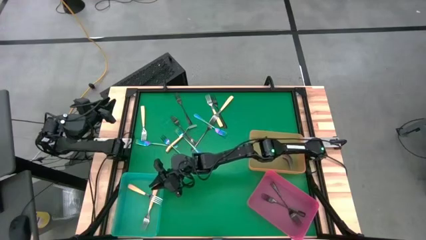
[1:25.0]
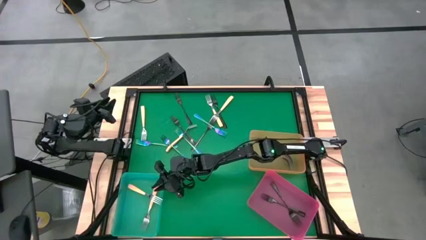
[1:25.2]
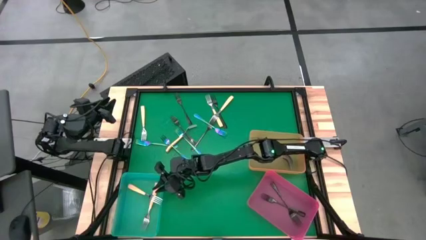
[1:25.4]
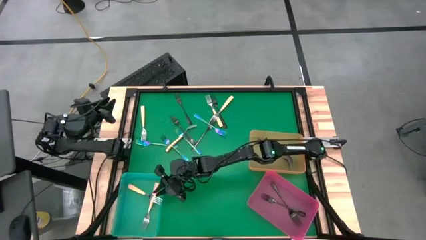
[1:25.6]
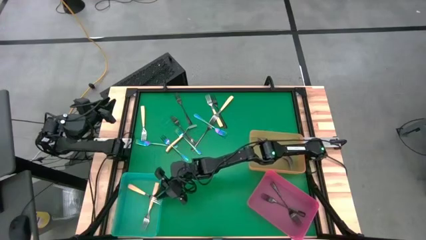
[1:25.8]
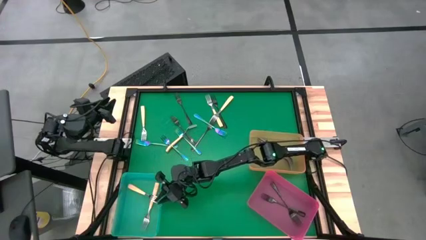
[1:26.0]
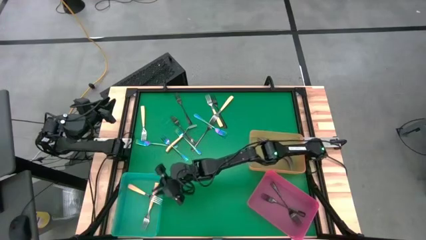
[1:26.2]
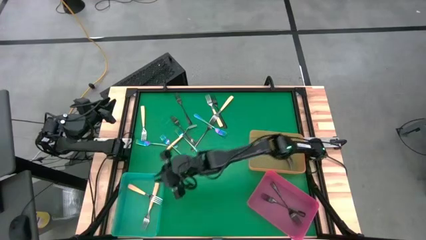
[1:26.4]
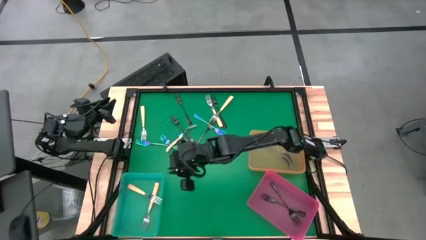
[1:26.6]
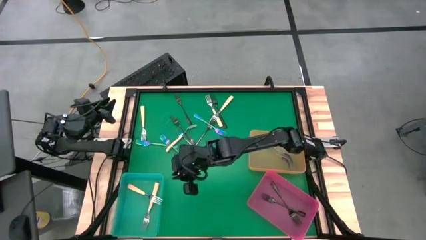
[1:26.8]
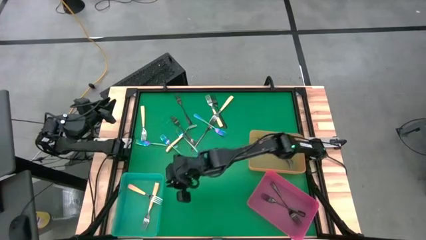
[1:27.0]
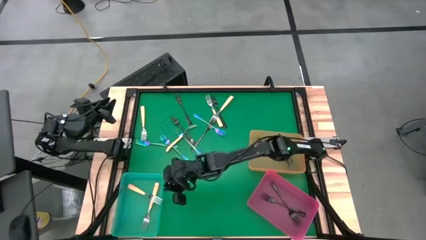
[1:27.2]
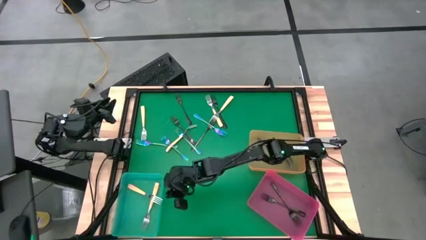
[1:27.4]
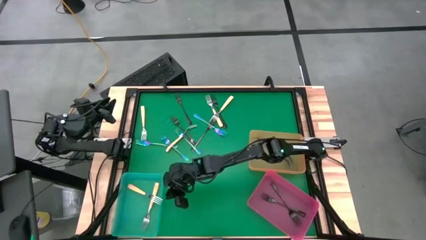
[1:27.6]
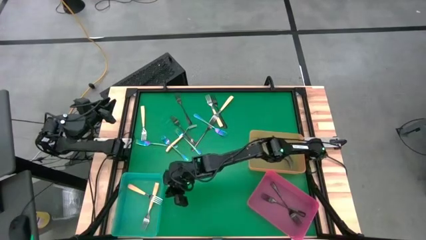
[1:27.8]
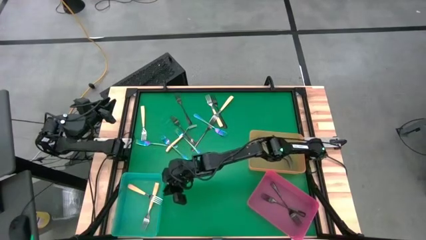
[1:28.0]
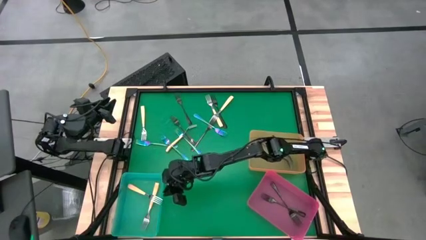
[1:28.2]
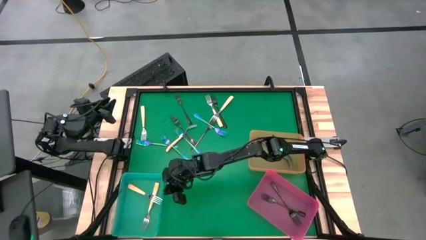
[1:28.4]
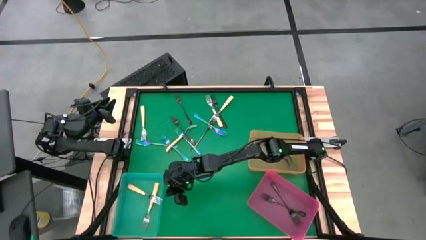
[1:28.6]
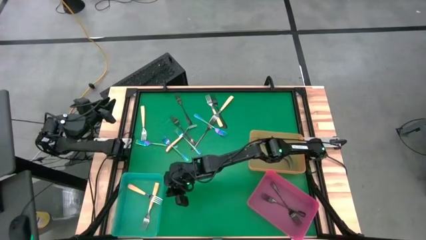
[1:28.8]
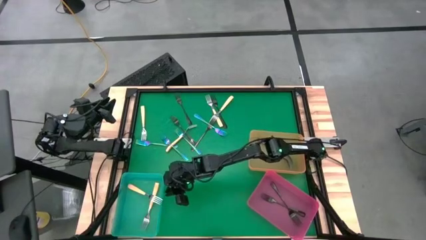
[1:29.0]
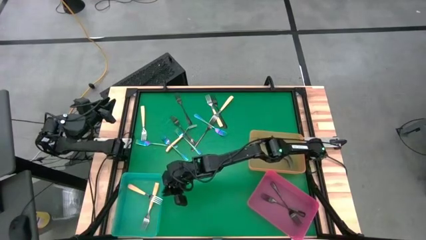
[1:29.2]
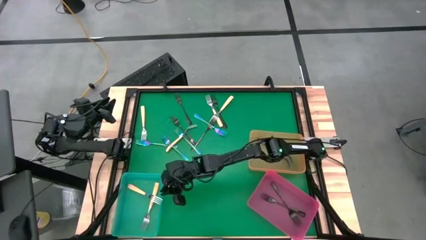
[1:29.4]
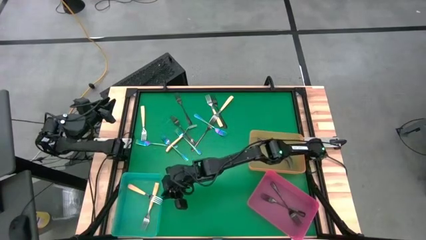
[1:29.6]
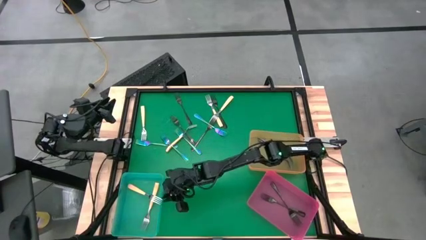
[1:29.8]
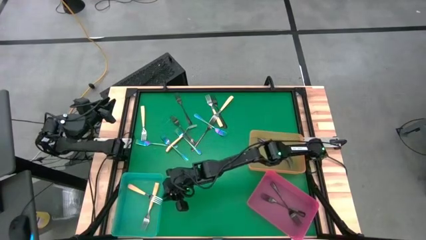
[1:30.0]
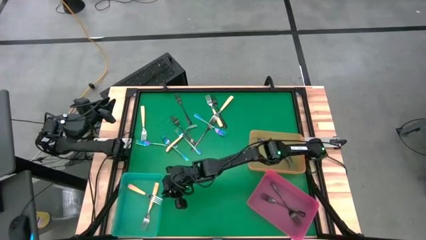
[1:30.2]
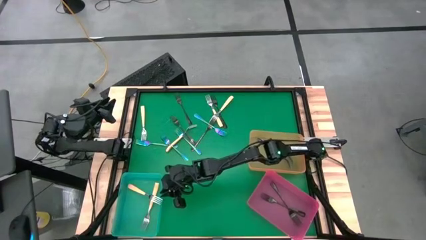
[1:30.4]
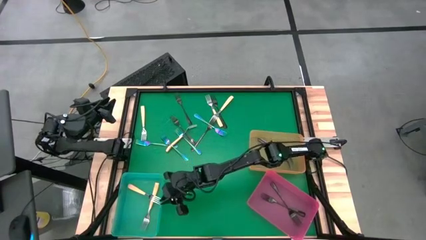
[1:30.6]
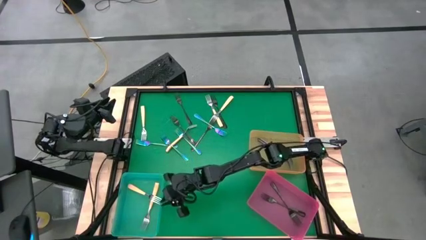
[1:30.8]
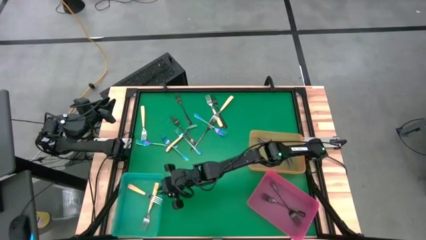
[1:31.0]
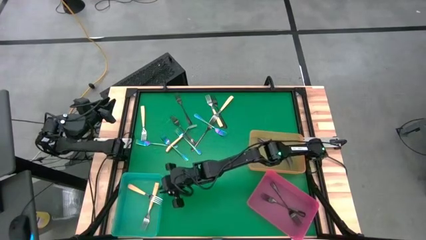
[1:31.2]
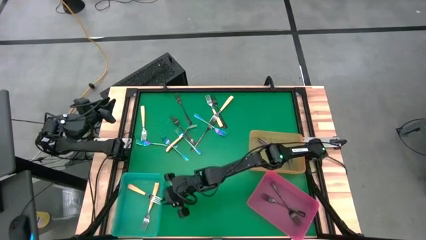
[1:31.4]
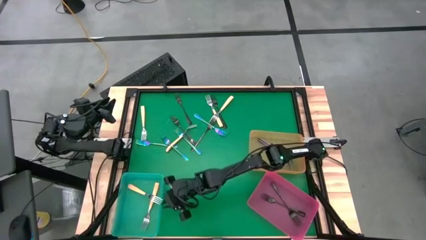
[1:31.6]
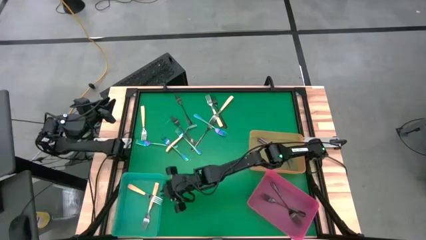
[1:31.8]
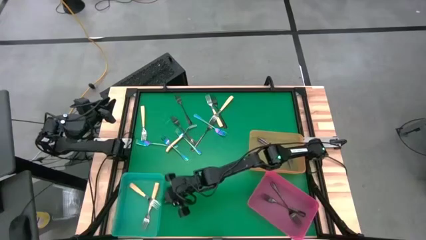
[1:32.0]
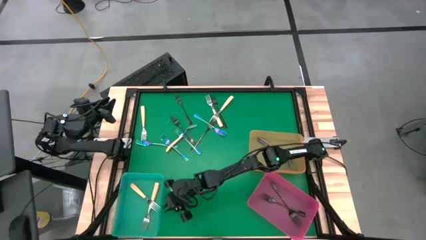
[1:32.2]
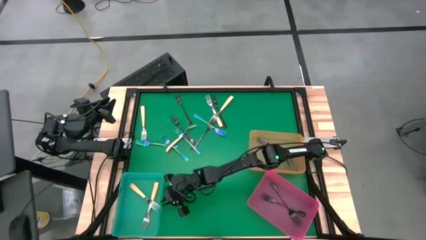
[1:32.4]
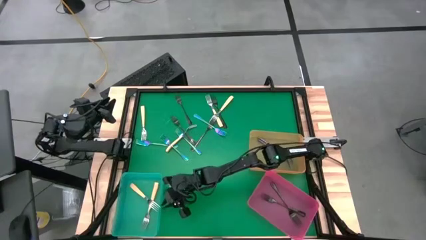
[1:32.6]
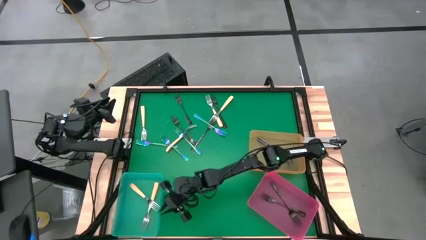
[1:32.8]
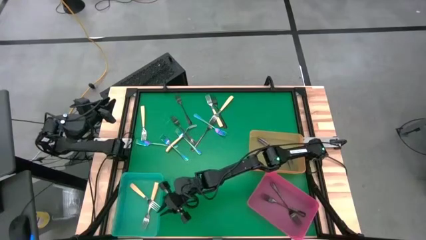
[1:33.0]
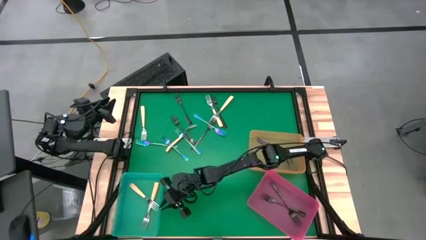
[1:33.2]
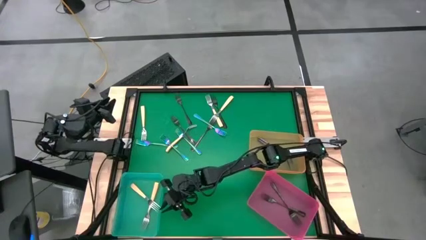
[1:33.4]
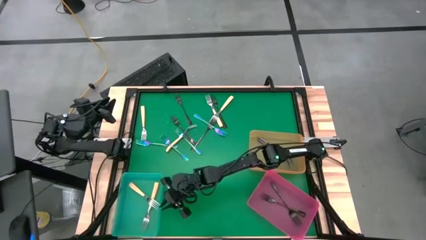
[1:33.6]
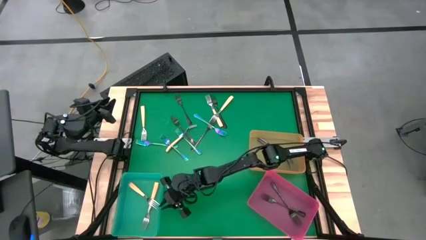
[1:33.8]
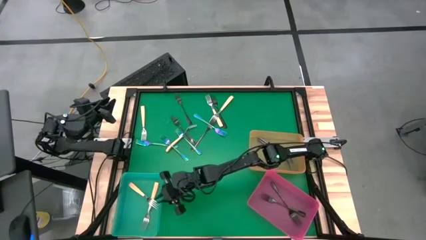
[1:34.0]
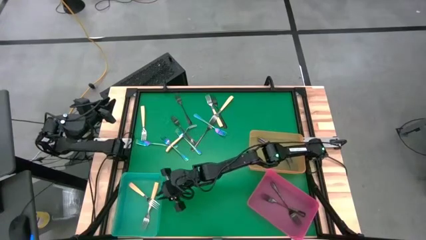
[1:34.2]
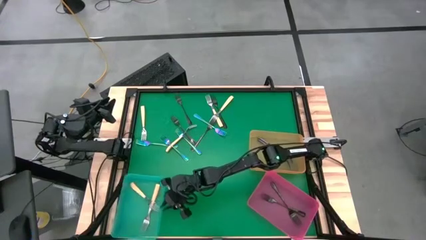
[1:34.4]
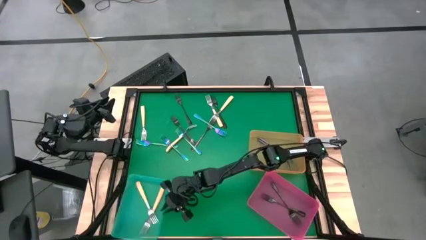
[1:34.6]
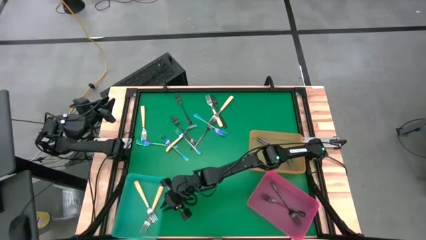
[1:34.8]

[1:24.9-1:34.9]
Task: Sort silverware by color (type)
Put the yellow fork into the blue bin

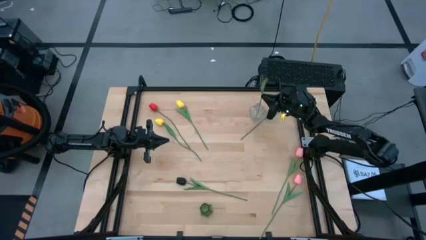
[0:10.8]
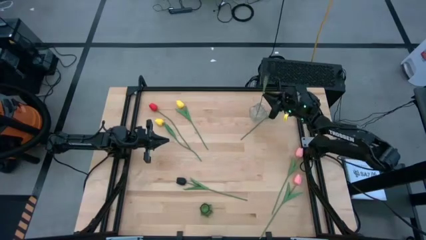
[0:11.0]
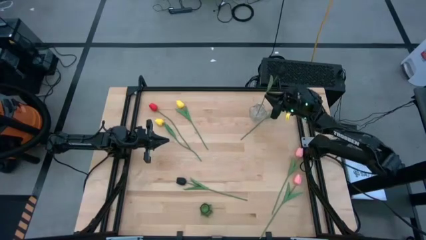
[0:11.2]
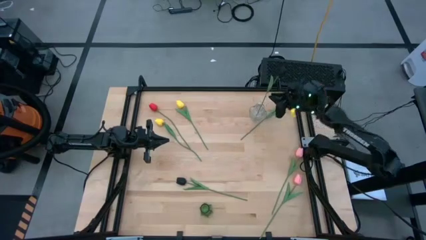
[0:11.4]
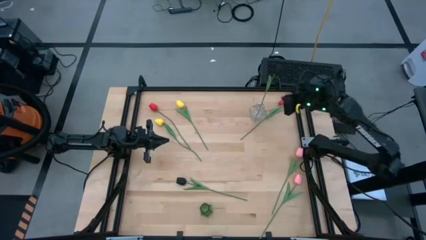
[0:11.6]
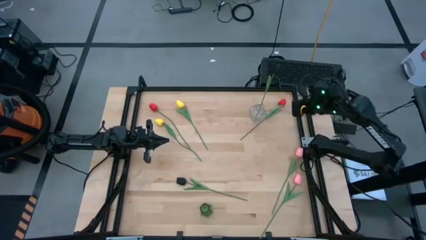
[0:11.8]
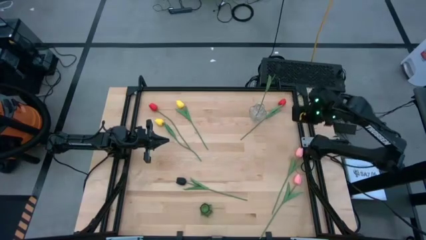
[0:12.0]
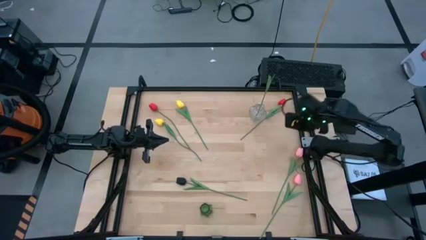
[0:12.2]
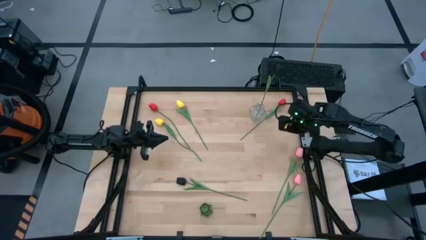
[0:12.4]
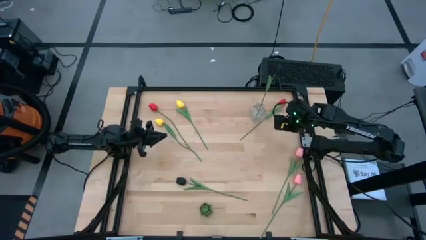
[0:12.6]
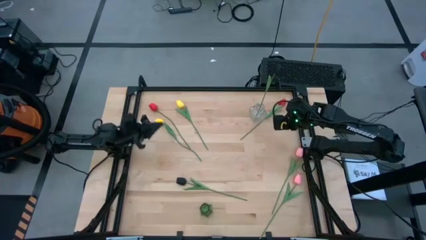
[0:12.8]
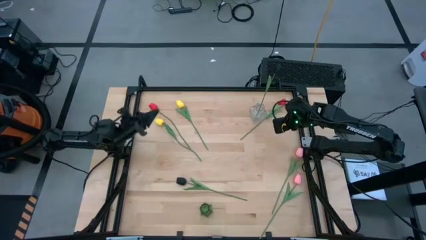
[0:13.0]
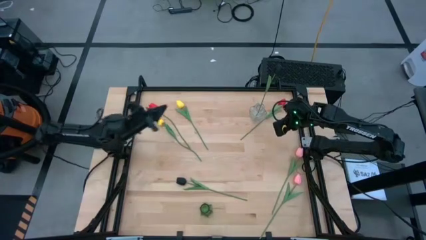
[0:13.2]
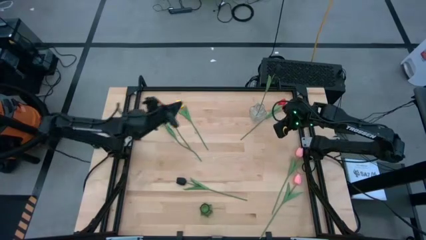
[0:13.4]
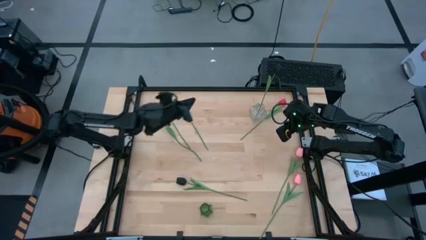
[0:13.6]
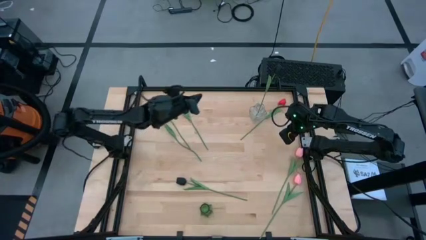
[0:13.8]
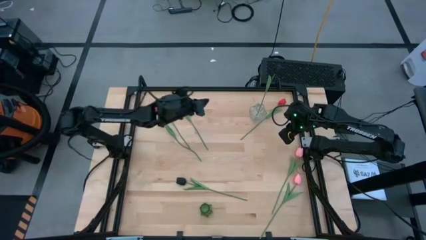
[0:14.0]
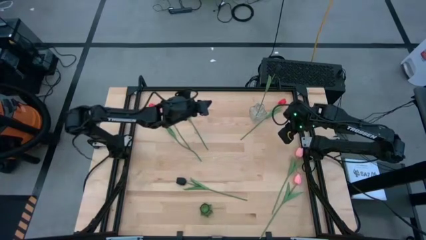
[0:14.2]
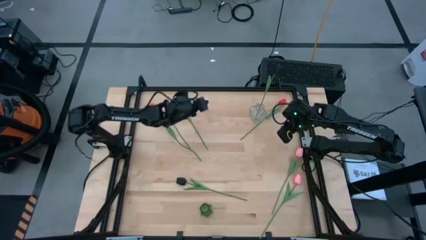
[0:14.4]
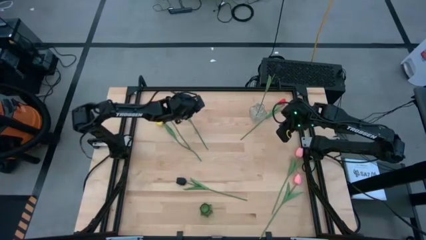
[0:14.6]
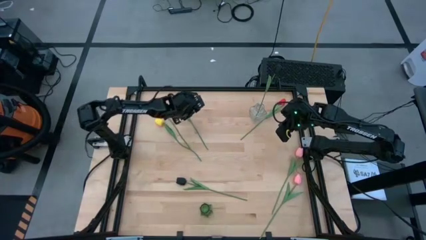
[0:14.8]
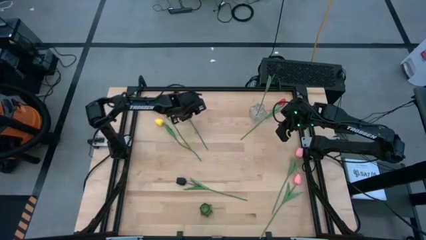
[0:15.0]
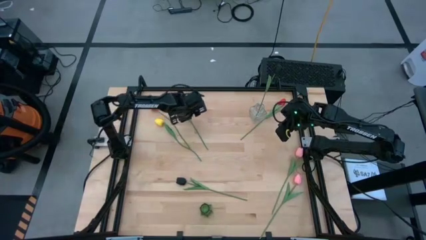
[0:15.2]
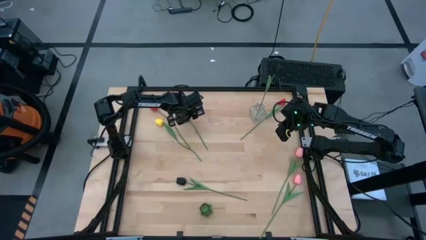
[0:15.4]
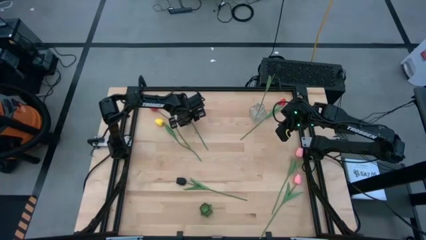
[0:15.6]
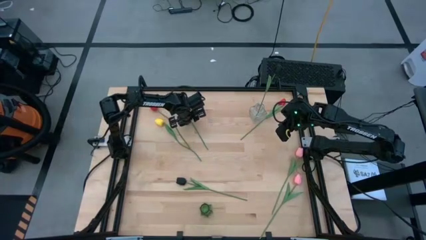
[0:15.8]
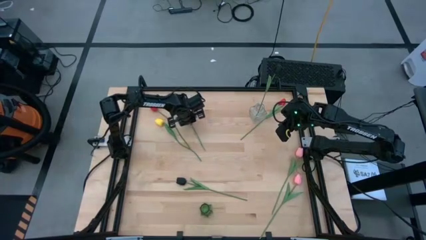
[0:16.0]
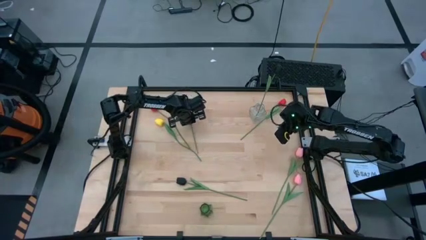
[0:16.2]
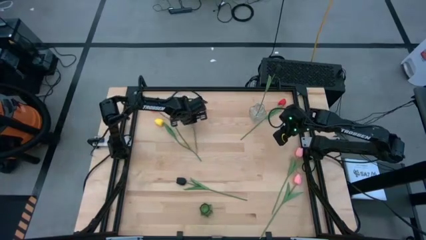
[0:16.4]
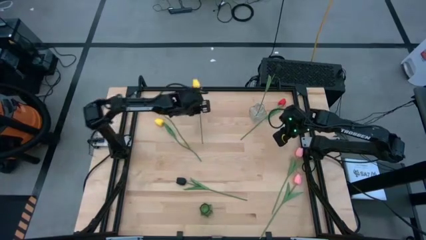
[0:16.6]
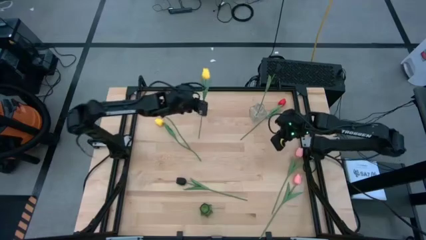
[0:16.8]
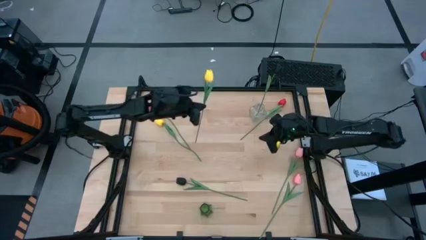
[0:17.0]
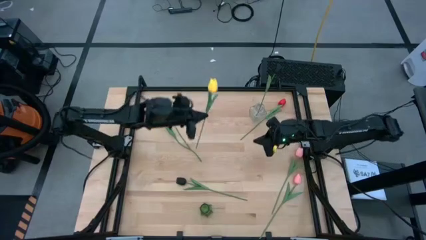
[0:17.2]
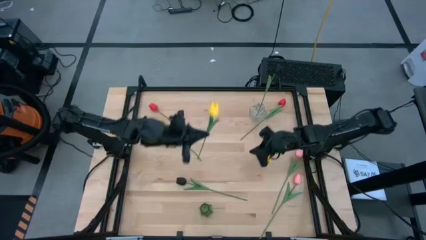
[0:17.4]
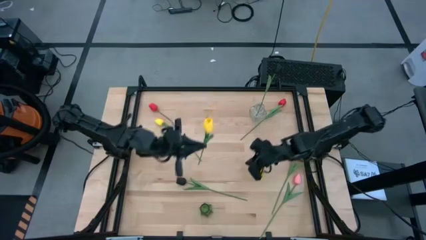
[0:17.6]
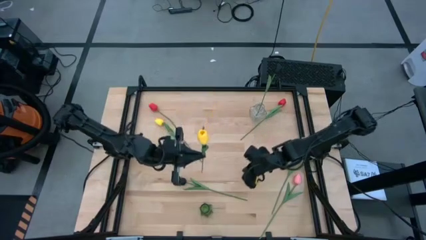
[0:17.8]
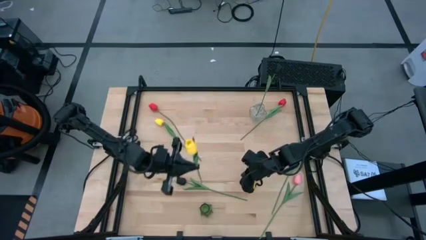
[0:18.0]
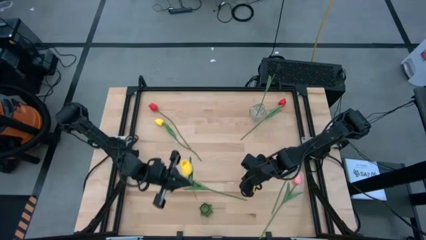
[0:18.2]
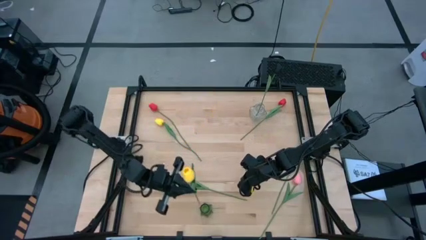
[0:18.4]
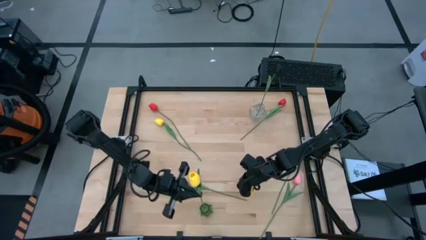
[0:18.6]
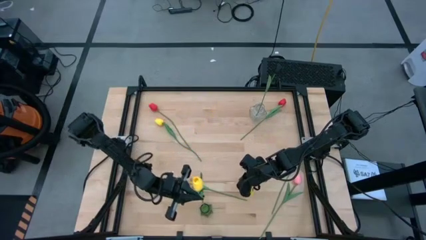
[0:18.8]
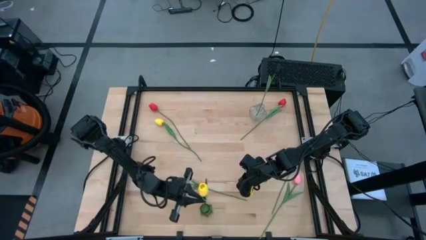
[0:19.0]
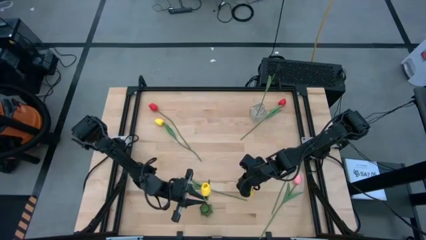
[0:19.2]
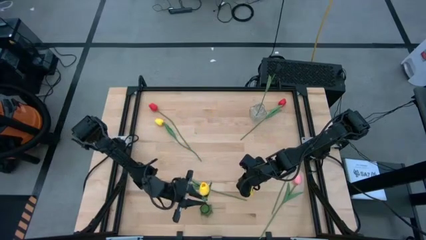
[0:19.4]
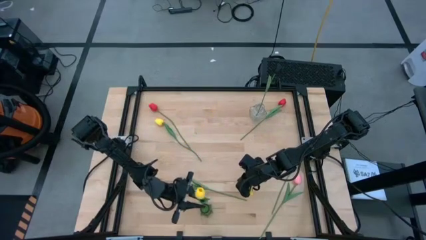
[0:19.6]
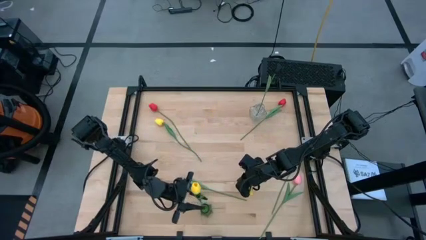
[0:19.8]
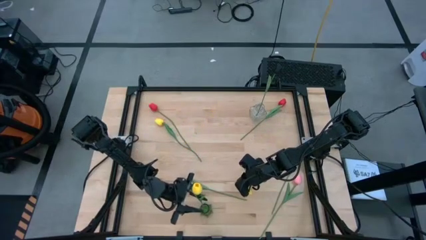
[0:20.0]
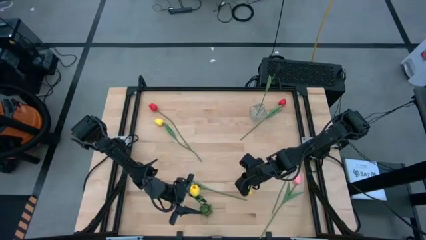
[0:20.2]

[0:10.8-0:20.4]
Task: Sort flowers into vase by color
Put the top yellow flower into the green vase
